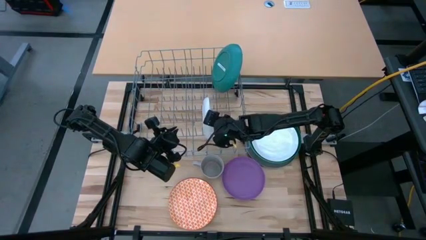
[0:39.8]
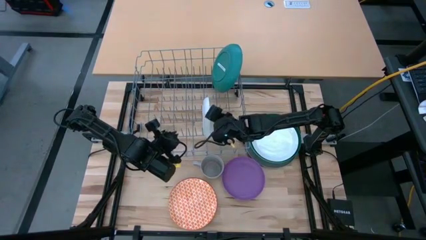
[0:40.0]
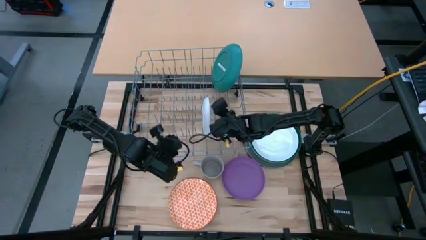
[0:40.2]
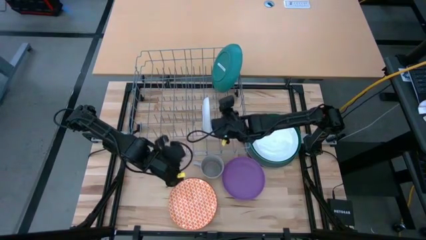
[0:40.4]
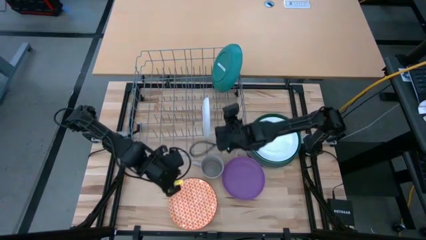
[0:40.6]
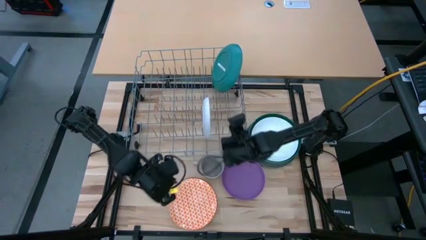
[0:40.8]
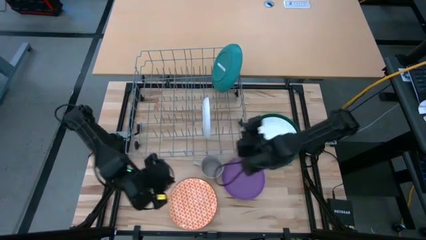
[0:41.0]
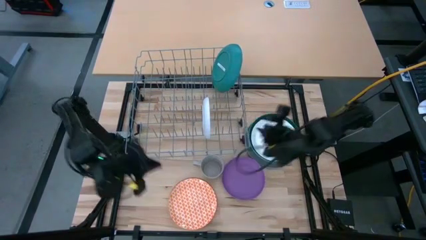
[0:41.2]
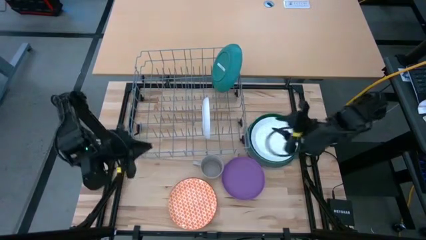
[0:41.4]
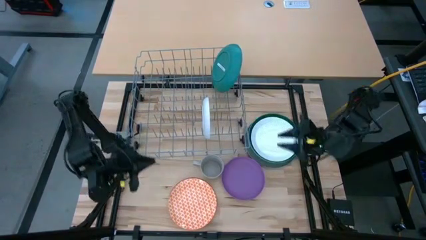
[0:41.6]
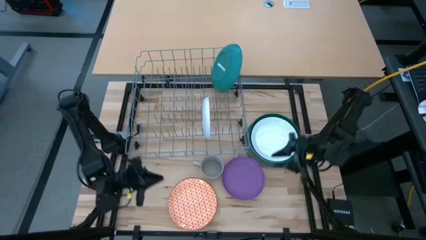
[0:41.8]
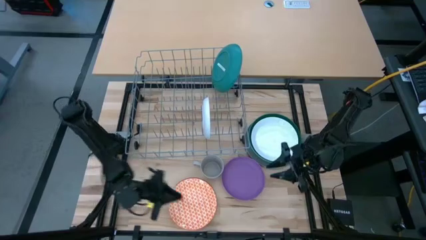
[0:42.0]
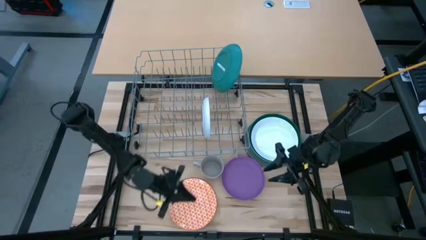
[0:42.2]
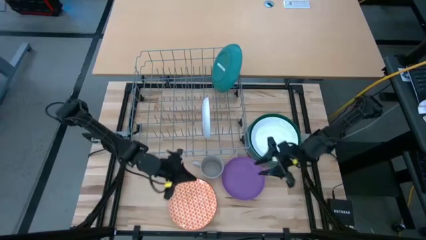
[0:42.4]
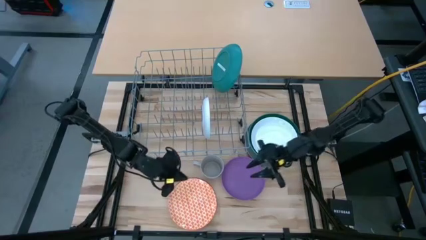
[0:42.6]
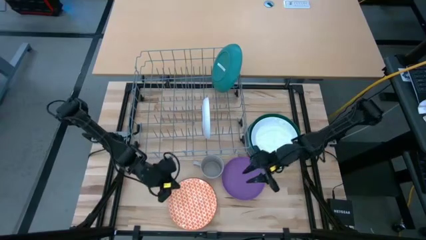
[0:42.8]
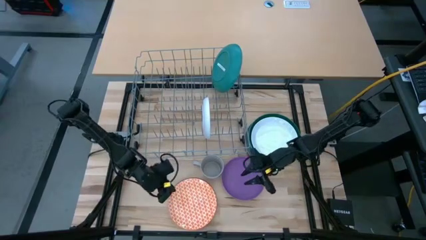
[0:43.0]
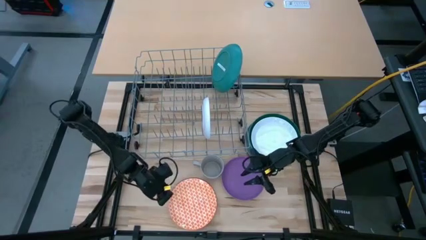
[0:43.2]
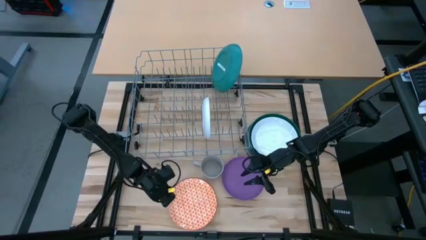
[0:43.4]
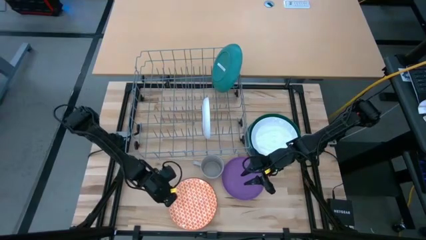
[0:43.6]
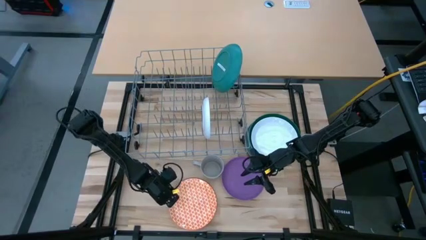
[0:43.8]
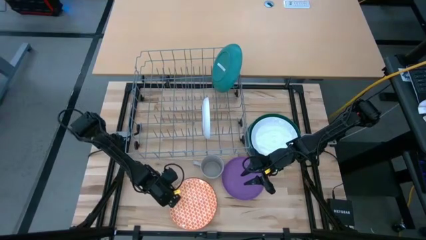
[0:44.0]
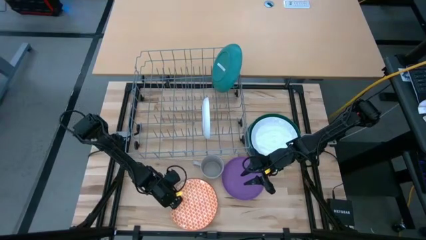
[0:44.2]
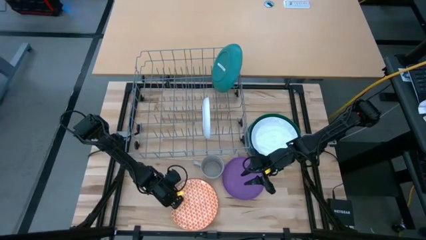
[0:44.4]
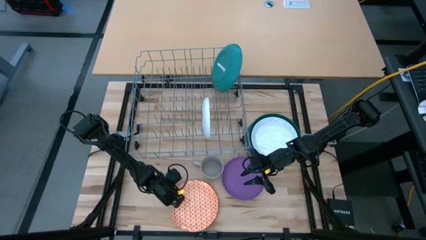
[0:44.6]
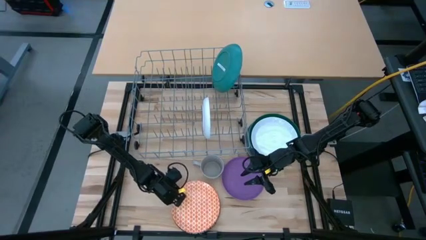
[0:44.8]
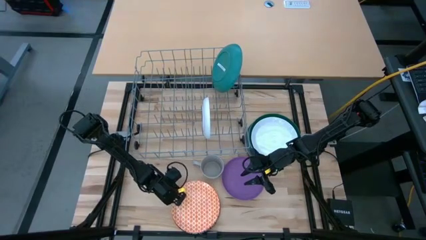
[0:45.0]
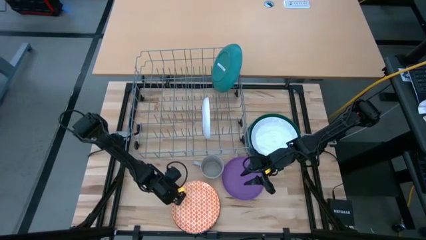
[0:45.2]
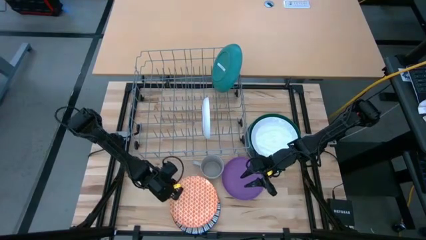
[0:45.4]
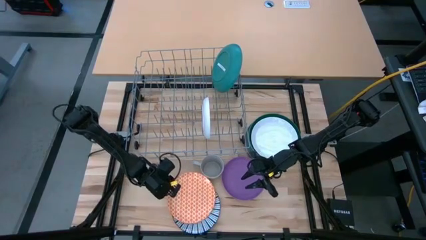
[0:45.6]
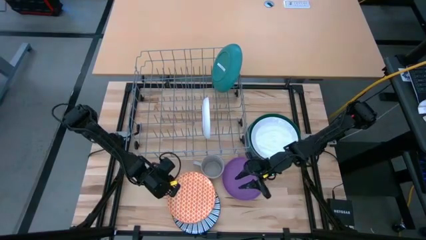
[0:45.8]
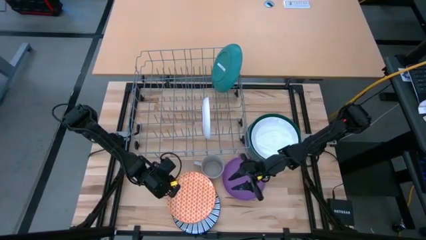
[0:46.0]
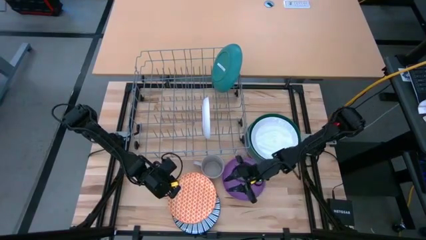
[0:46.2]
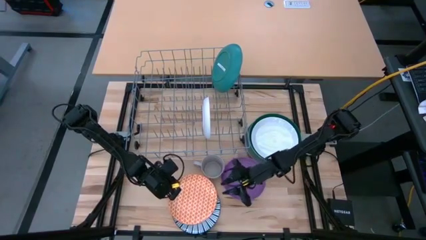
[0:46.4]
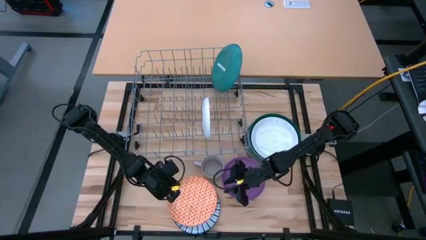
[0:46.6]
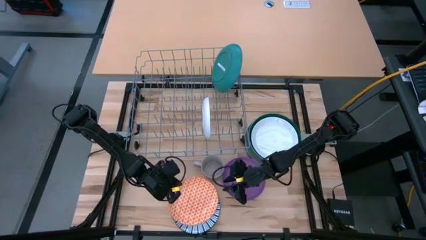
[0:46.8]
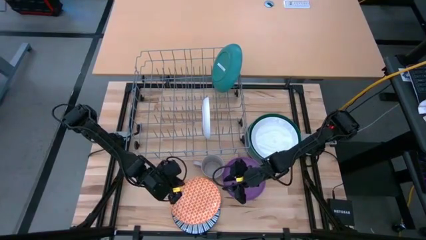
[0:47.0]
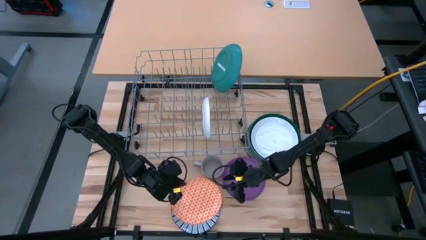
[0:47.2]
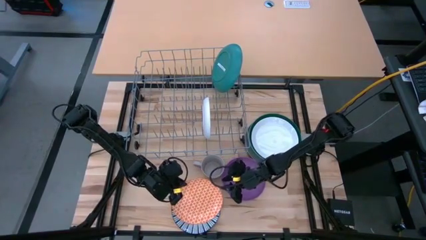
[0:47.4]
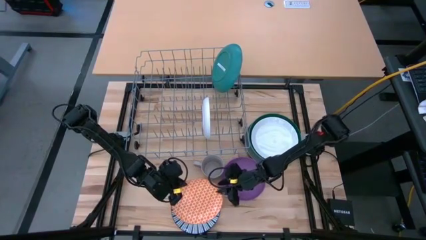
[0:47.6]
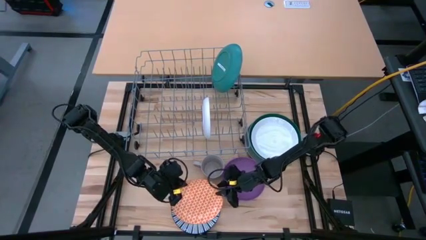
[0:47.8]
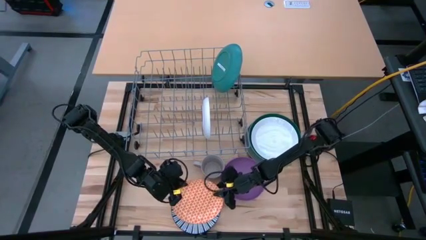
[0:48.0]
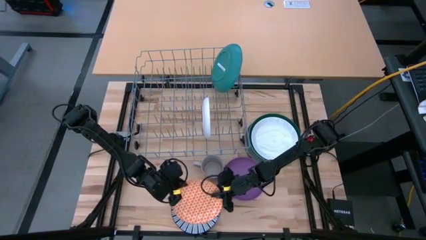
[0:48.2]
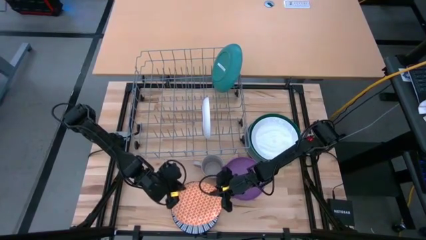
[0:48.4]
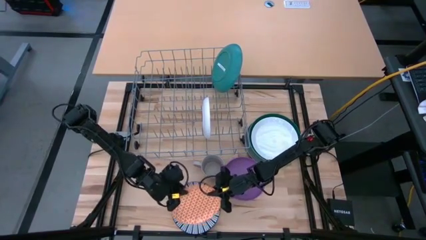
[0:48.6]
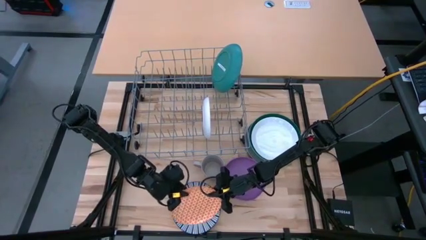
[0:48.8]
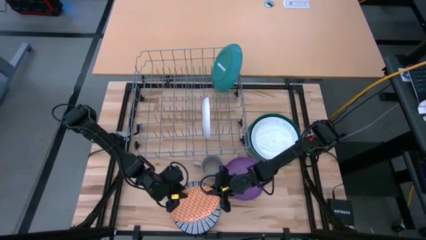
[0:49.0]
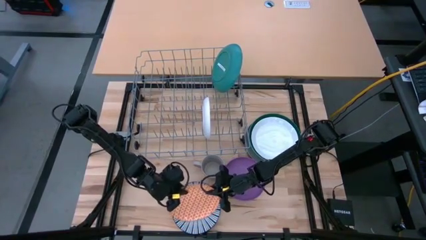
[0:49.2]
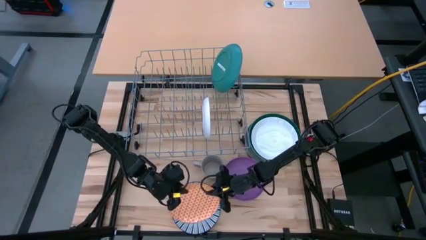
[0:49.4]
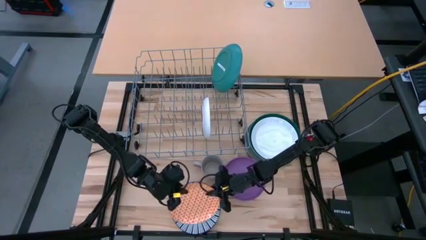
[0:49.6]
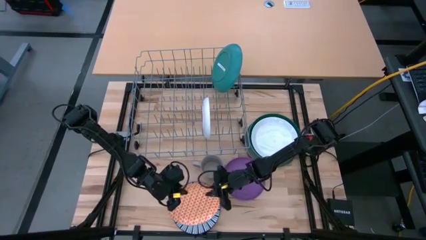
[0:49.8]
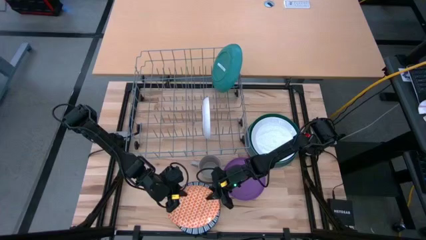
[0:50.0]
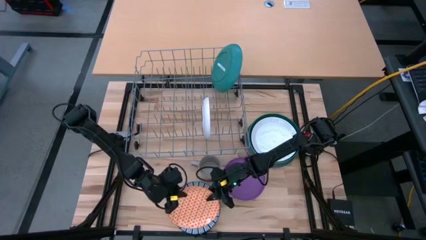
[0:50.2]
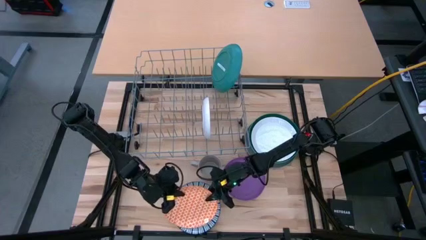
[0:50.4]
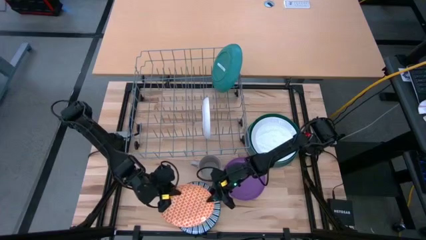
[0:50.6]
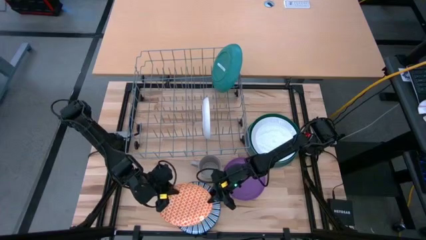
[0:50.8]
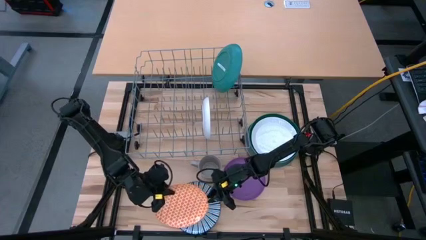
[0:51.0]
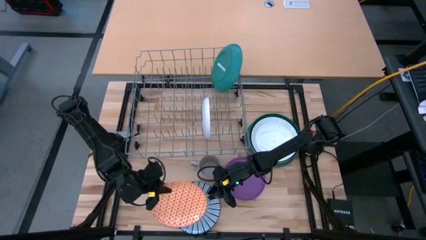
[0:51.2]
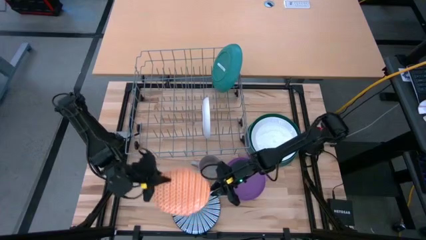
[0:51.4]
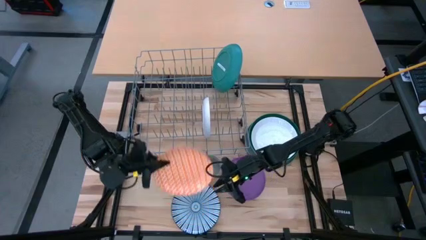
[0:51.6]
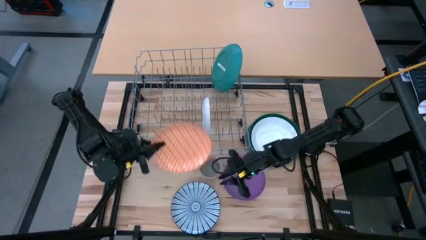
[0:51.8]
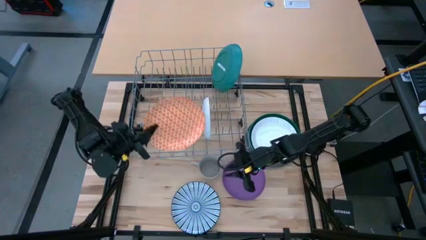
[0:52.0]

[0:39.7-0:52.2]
Task: Sort dishes
Put the orange patterned plate in the dish rack
